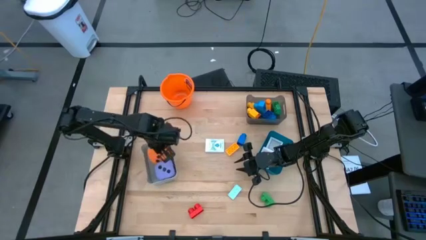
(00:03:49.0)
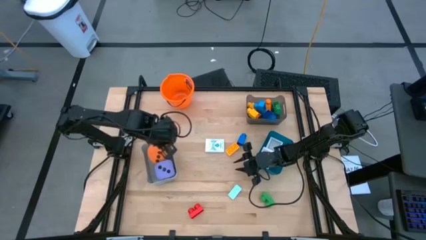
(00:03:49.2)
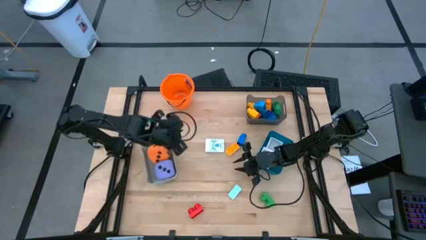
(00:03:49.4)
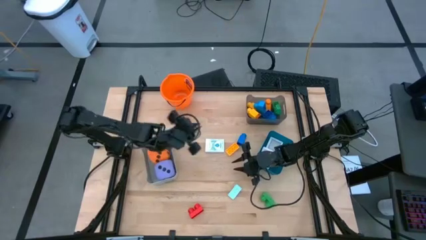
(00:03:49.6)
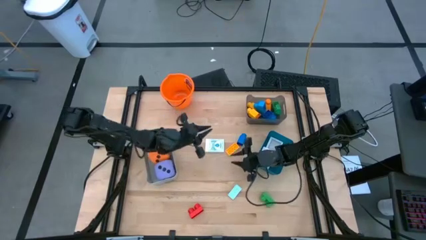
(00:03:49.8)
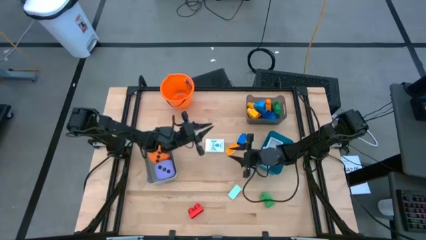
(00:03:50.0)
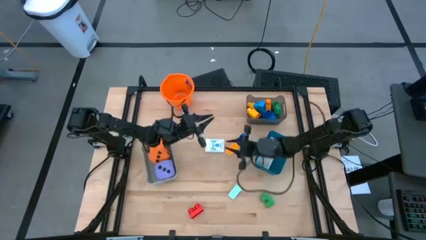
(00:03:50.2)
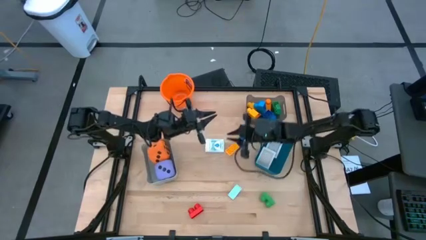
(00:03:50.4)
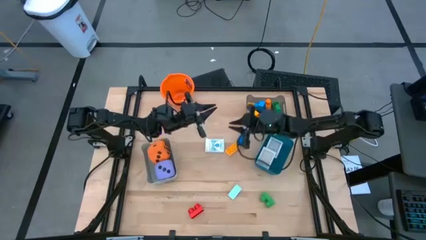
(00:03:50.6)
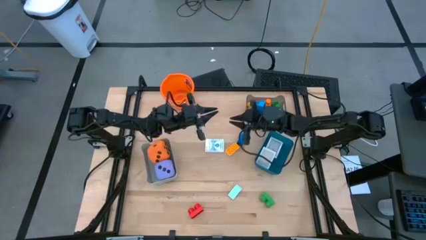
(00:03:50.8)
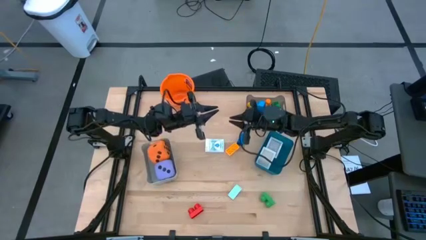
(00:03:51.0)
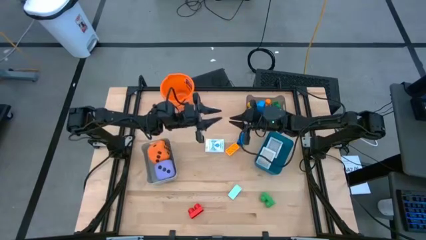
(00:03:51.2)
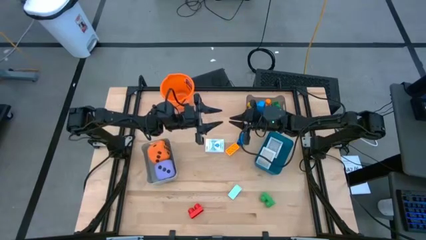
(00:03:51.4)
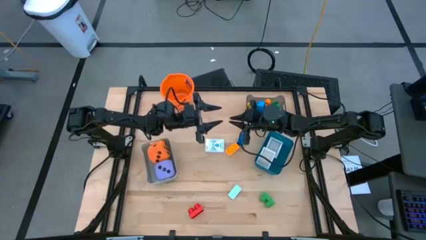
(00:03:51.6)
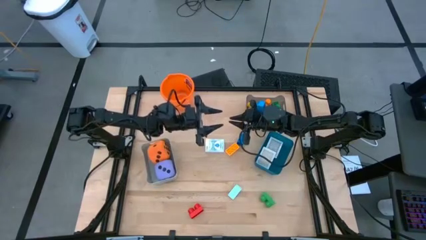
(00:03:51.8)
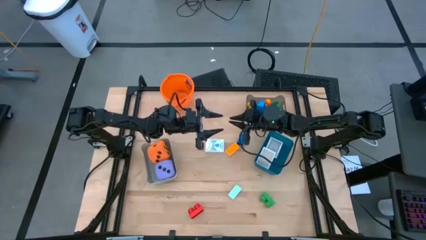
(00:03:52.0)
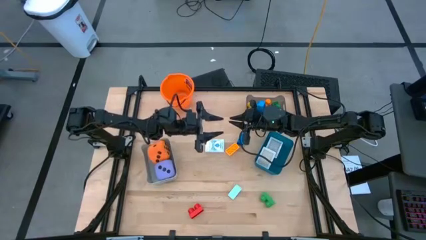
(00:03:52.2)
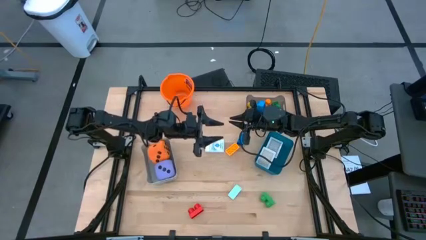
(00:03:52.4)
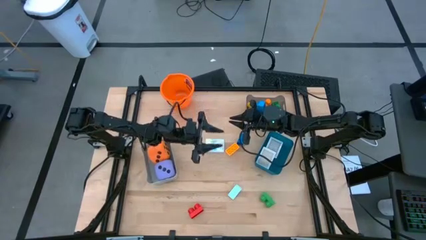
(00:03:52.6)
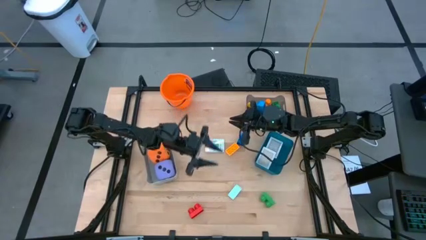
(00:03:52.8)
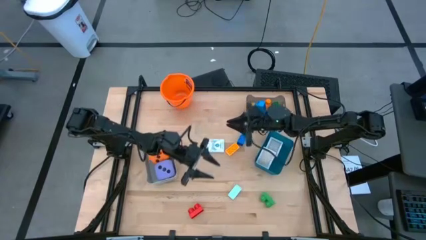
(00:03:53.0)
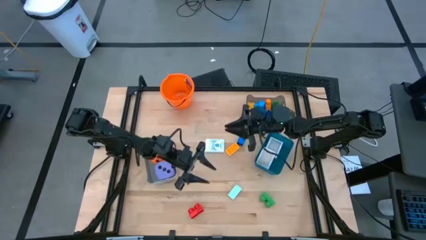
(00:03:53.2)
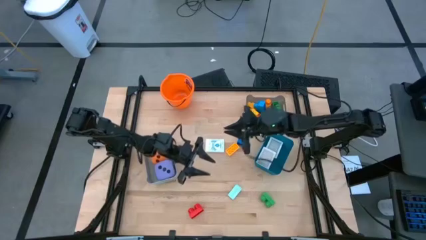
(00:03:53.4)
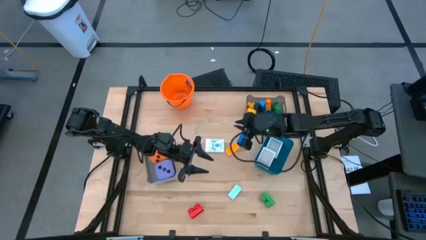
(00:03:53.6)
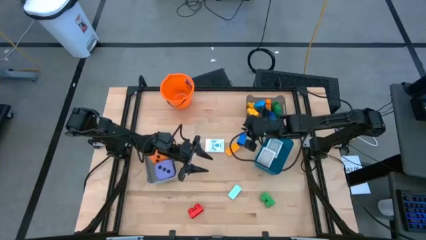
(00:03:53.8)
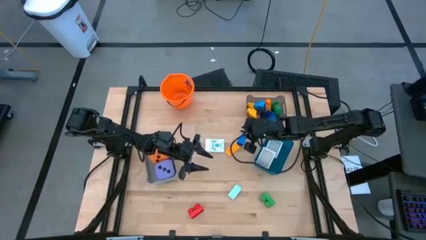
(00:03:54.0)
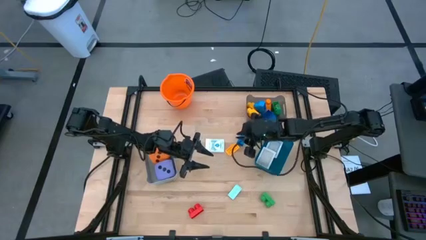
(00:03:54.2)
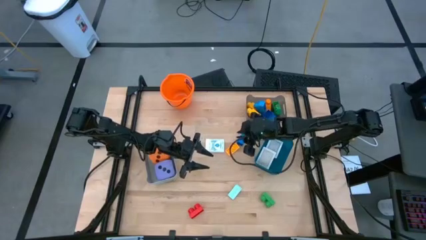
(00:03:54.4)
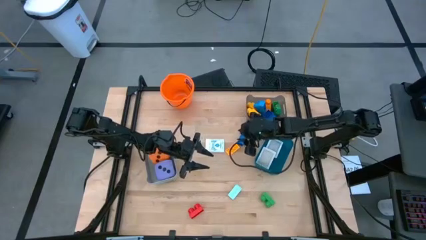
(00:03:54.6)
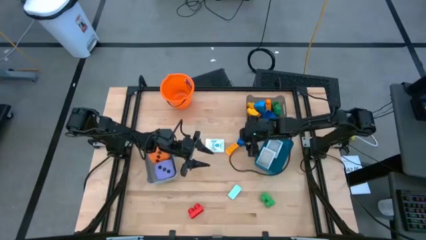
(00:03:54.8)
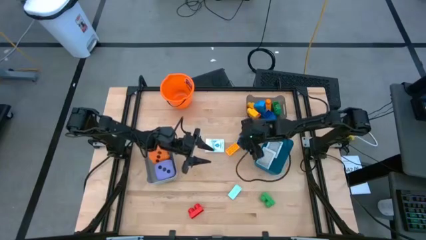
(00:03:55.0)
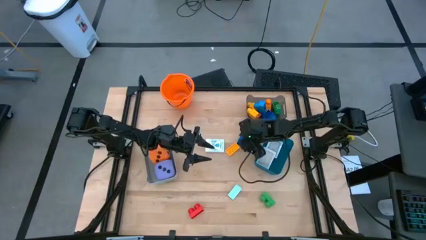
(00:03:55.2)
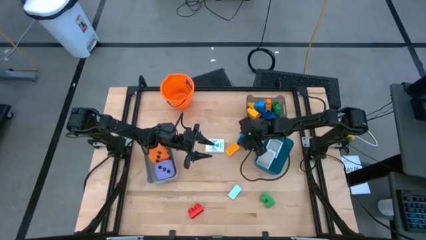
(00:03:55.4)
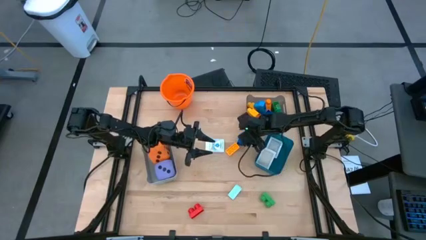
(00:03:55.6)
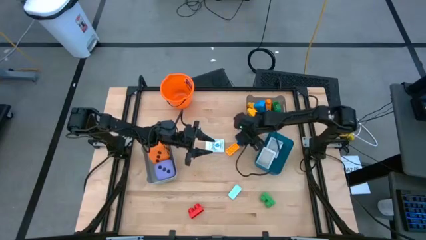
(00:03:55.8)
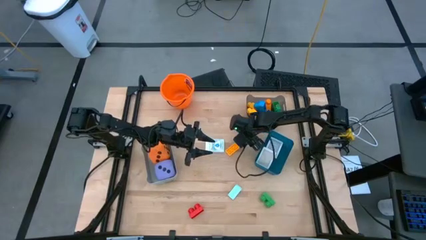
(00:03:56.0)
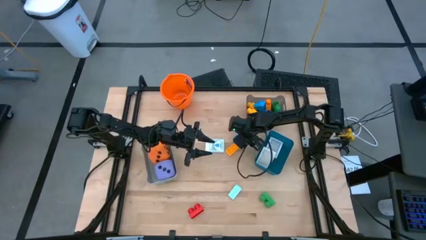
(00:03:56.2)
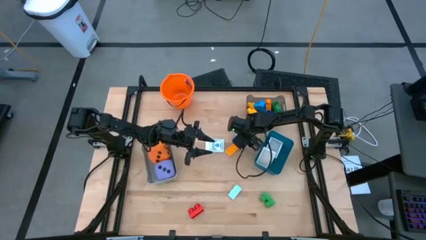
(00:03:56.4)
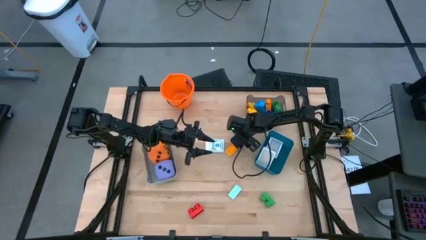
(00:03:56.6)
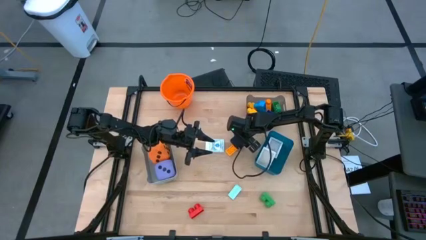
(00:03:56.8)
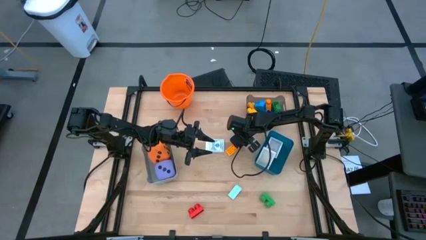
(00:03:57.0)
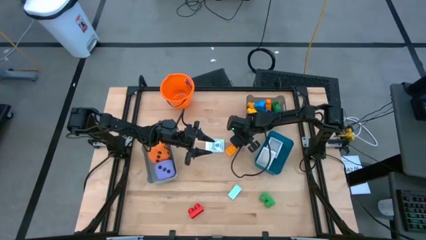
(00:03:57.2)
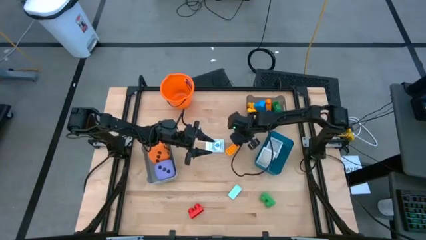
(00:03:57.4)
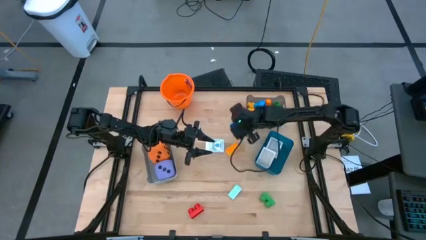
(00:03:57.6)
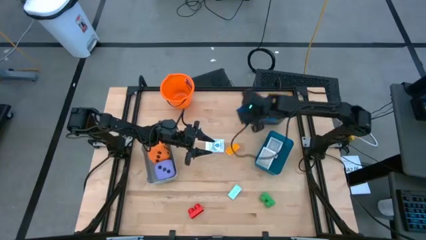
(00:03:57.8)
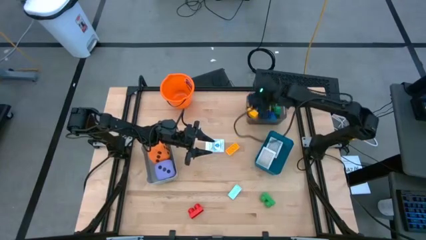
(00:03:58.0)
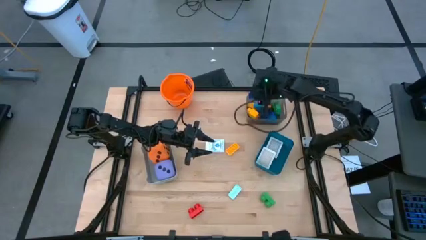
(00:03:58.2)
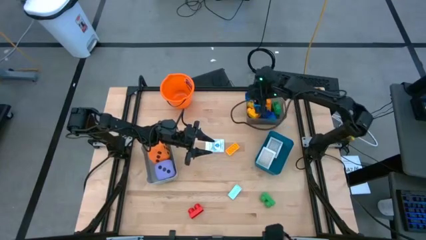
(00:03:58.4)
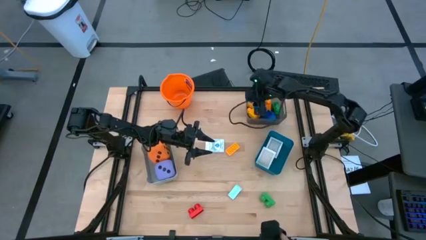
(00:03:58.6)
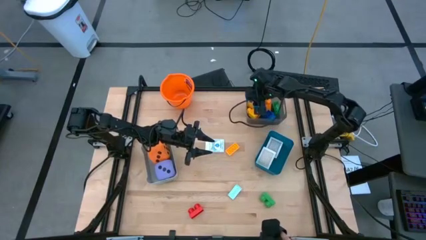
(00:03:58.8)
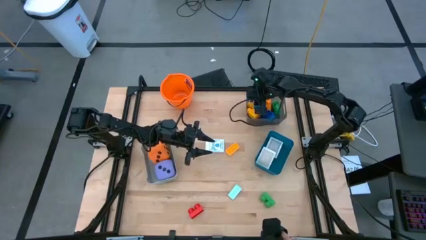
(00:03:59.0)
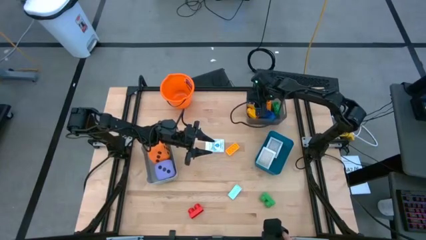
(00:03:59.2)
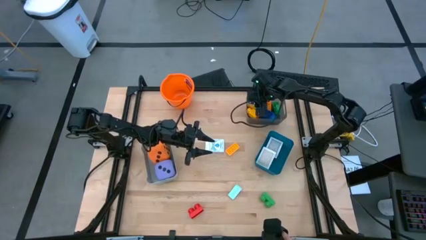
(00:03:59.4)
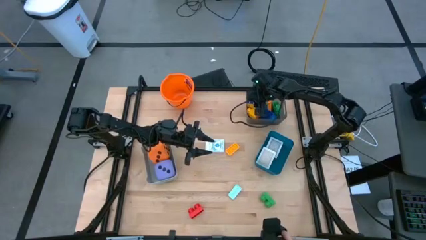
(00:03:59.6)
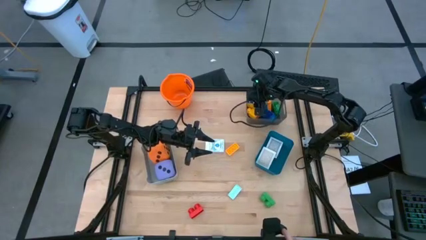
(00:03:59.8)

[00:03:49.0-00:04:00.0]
Task: Pick & Place Toys
Put the blue game piece into the black bin

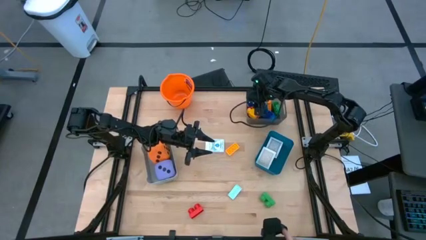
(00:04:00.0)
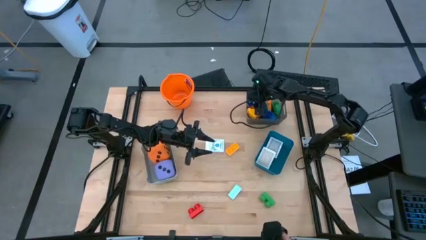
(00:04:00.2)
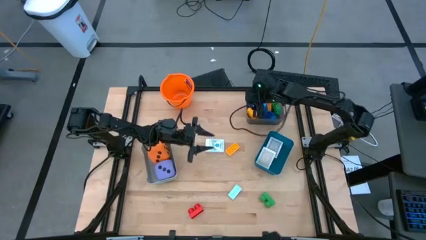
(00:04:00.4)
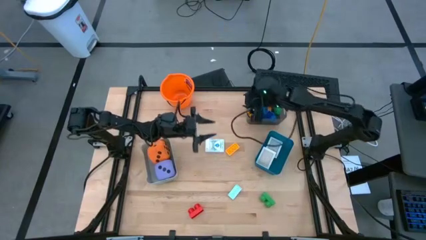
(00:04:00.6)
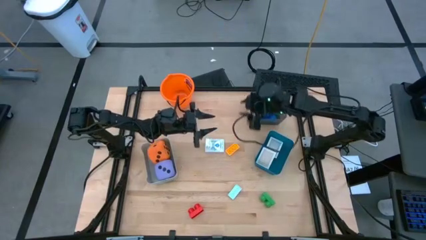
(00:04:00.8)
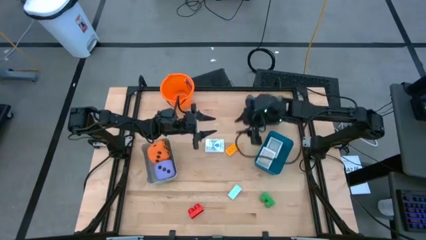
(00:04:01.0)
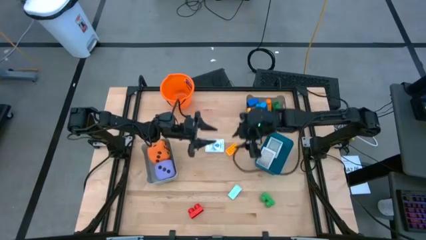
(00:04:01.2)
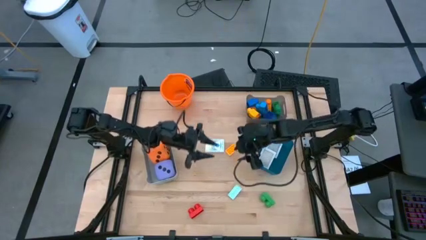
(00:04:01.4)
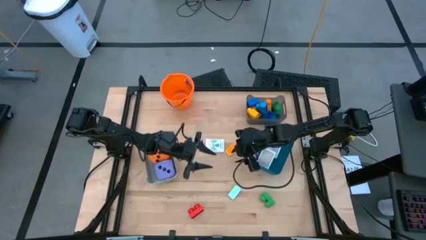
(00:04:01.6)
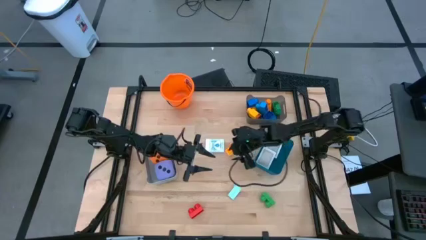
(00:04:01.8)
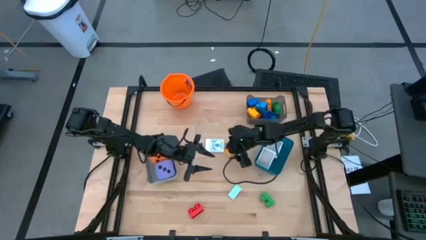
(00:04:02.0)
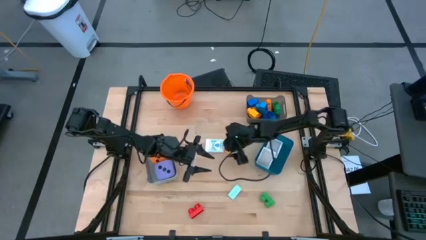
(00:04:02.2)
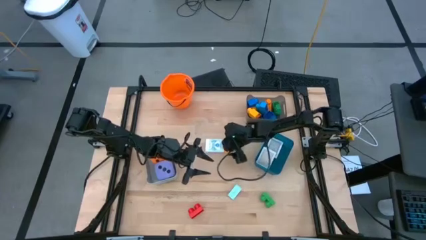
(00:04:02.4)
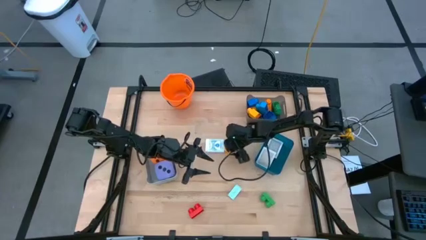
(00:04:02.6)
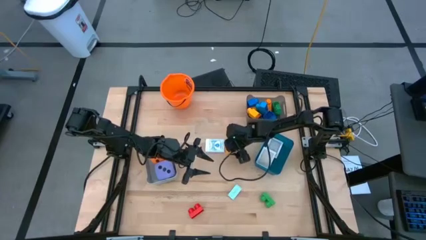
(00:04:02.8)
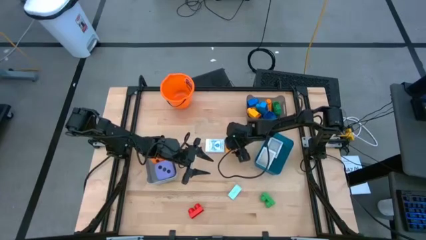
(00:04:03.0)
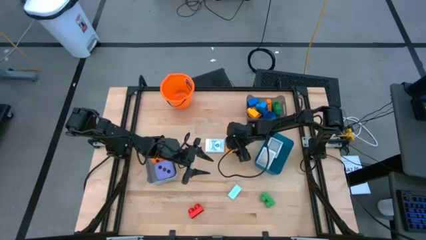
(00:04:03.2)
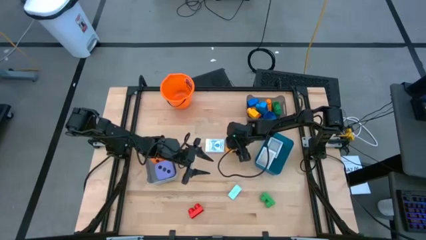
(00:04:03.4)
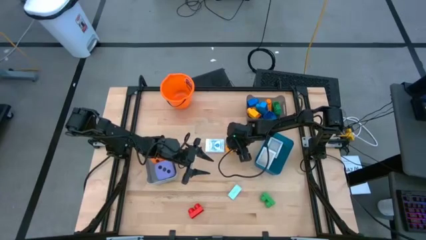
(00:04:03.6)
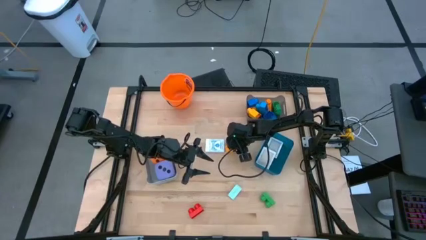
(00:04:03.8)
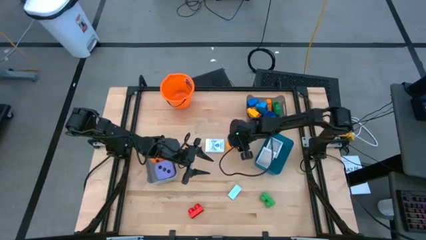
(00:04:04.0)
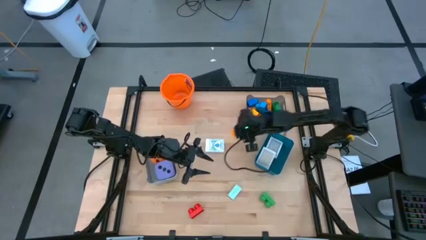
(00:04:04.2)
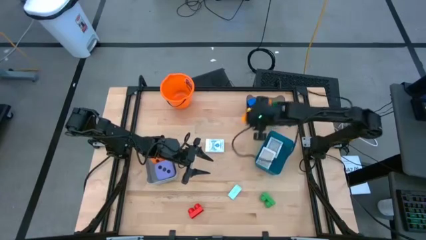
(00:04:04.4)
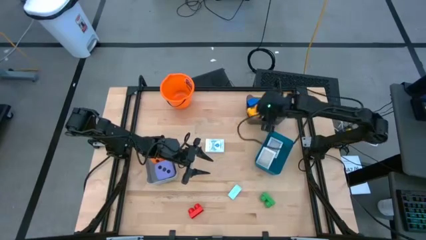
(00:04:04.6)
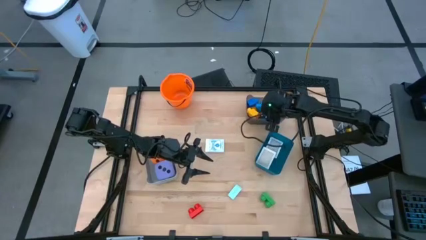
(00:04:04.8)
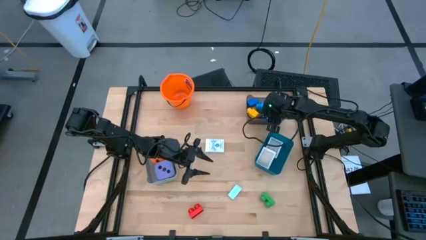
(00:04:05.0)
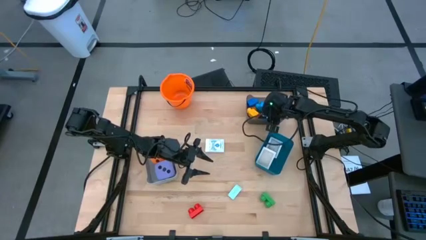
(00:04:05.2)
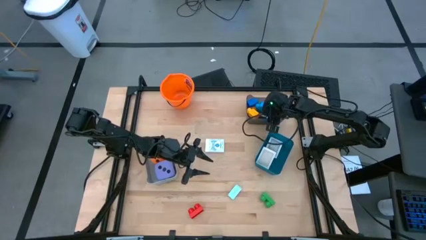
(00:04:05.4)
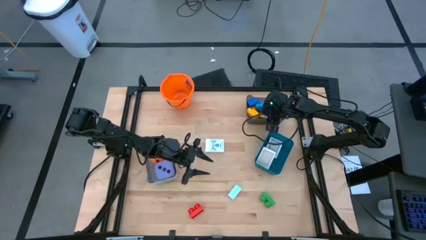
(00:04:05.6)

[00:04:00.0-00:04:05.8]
Put the yellow game piece into the black bin
